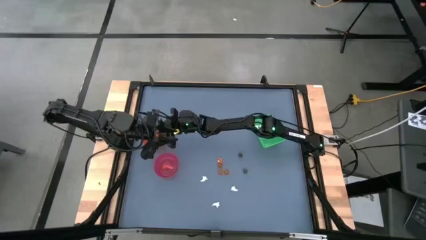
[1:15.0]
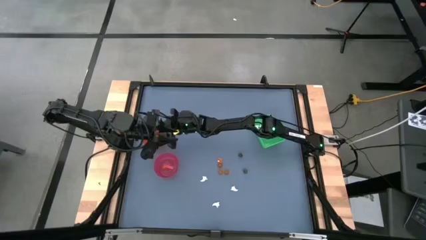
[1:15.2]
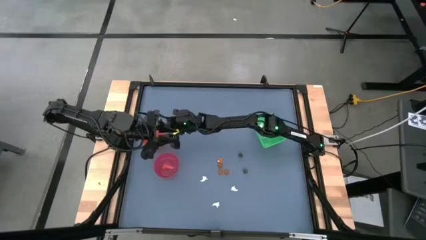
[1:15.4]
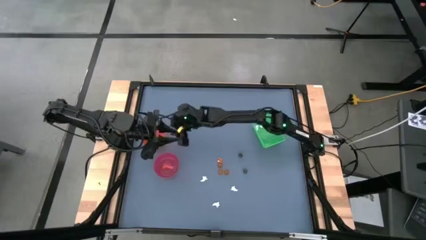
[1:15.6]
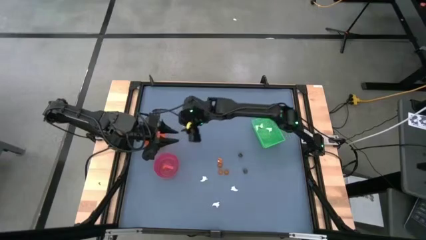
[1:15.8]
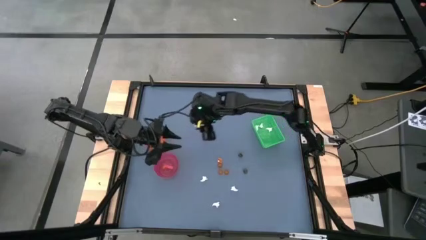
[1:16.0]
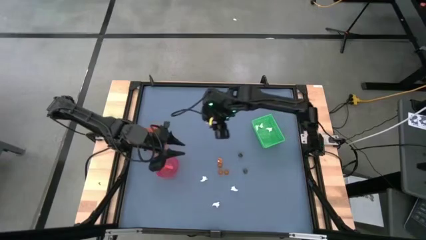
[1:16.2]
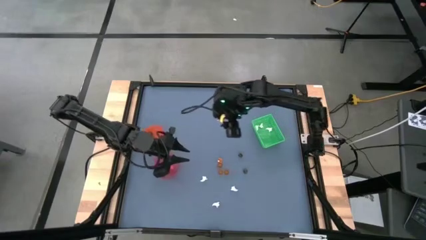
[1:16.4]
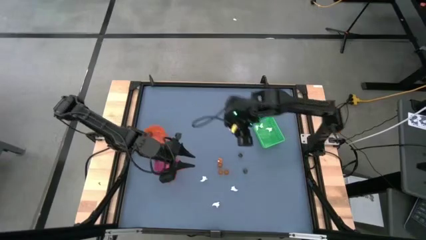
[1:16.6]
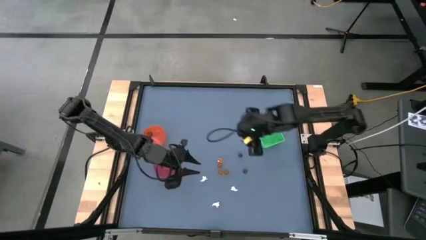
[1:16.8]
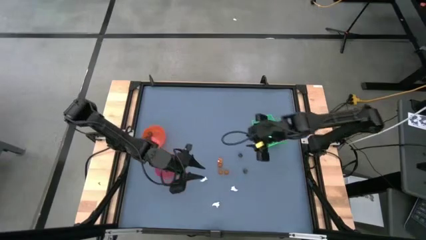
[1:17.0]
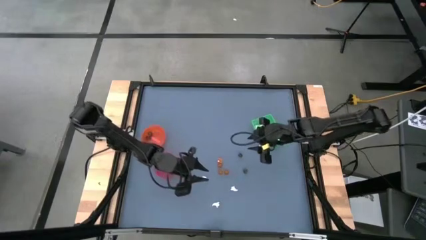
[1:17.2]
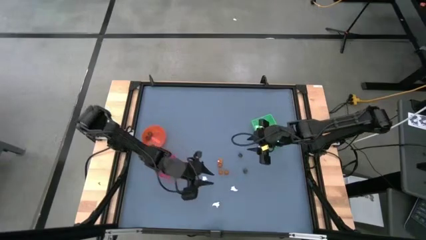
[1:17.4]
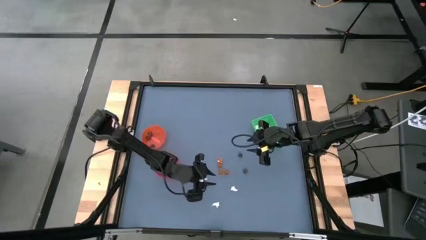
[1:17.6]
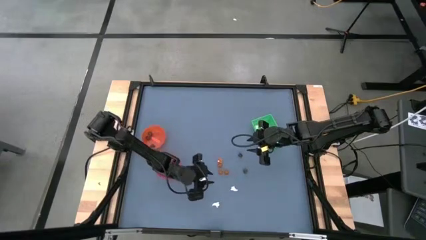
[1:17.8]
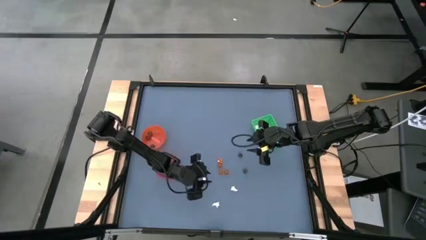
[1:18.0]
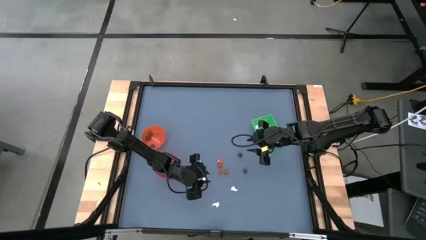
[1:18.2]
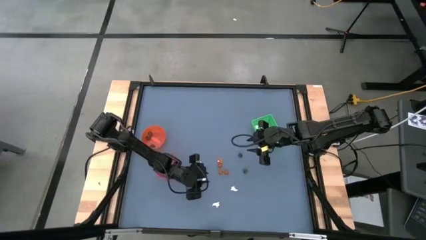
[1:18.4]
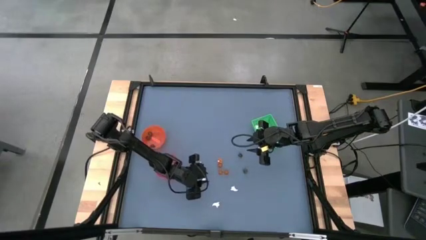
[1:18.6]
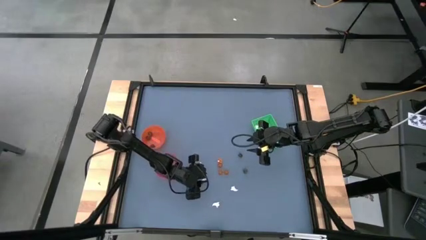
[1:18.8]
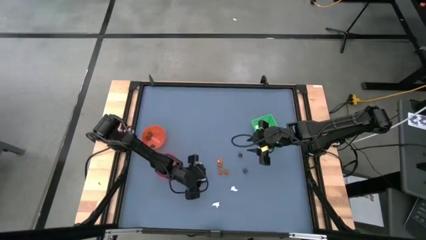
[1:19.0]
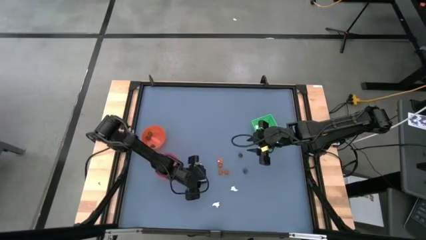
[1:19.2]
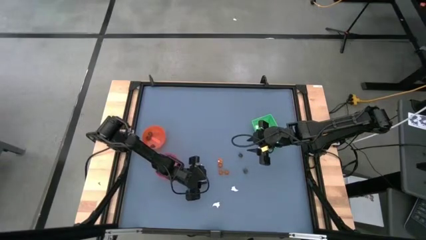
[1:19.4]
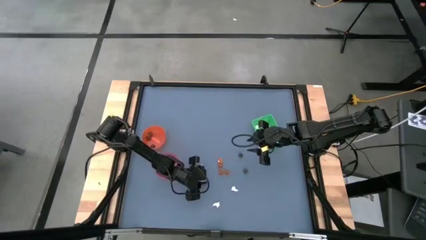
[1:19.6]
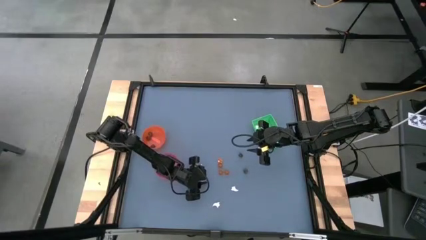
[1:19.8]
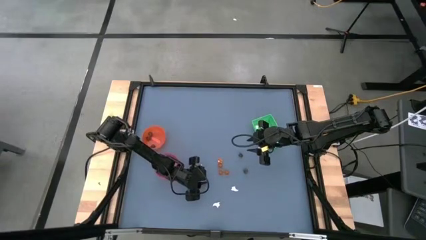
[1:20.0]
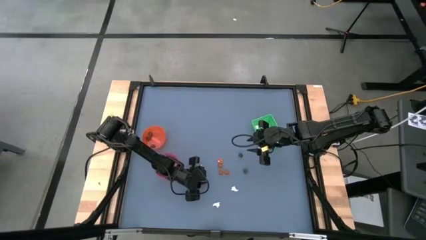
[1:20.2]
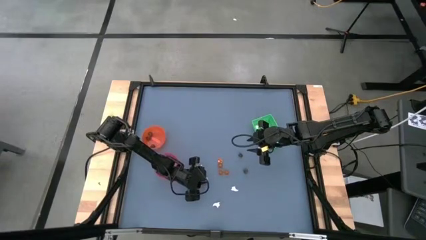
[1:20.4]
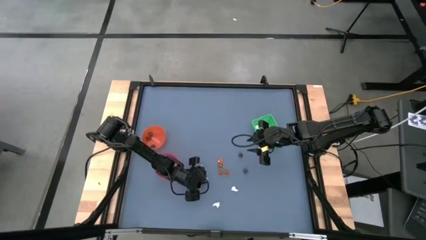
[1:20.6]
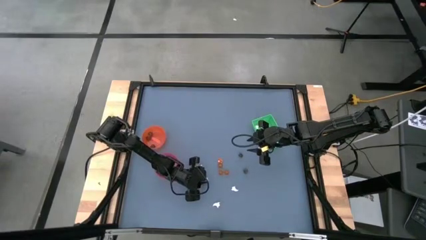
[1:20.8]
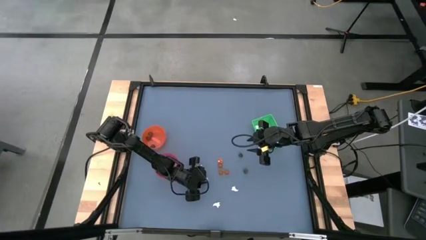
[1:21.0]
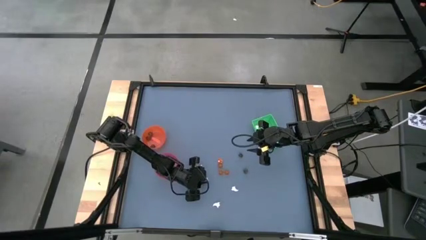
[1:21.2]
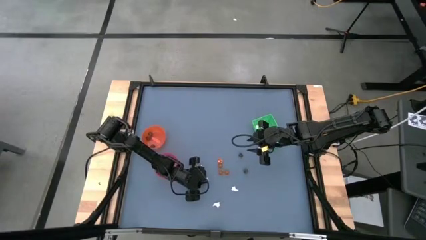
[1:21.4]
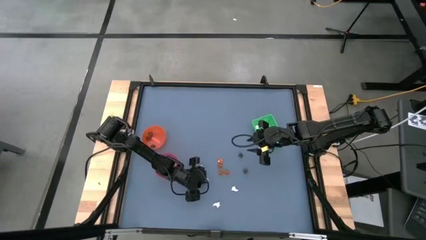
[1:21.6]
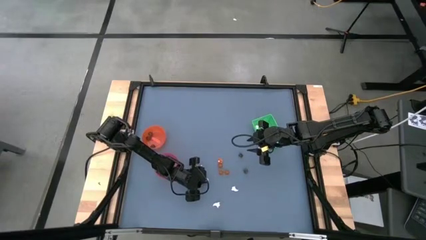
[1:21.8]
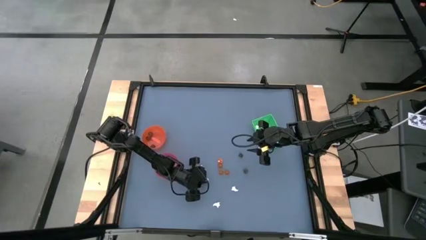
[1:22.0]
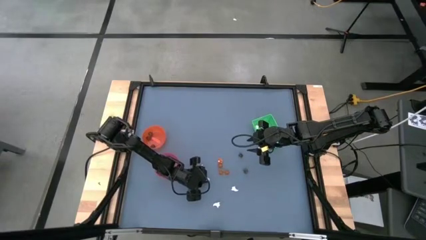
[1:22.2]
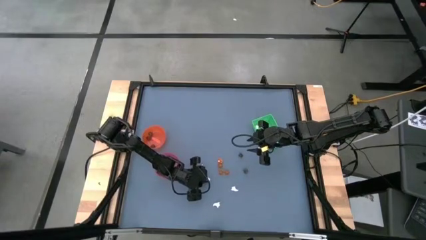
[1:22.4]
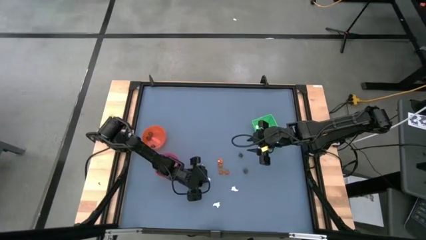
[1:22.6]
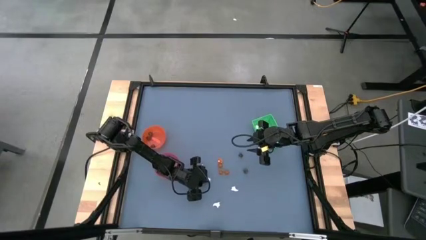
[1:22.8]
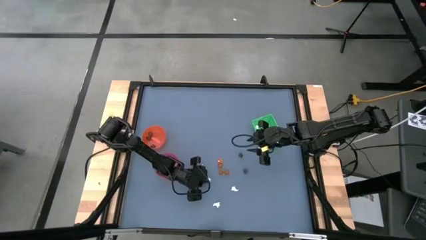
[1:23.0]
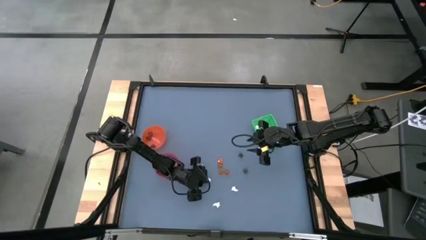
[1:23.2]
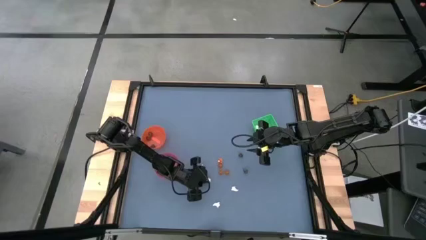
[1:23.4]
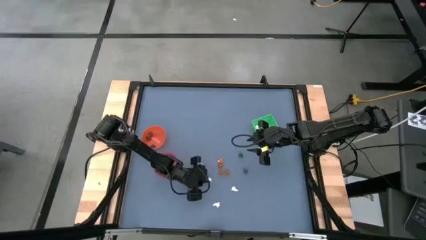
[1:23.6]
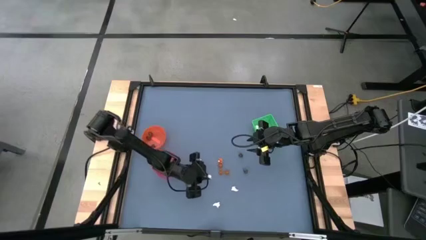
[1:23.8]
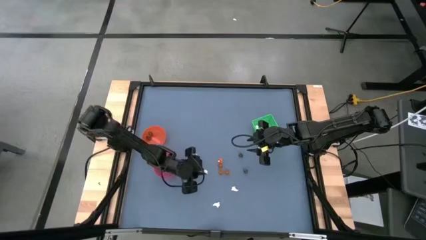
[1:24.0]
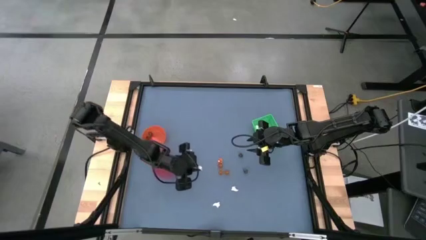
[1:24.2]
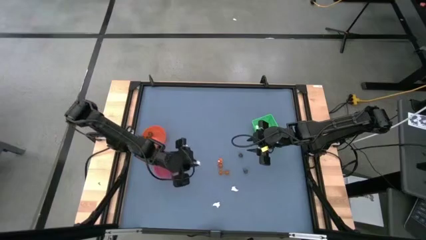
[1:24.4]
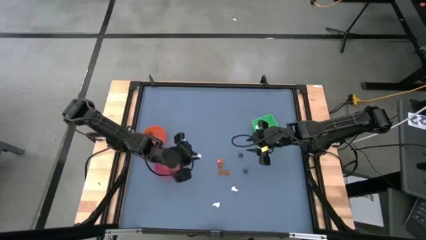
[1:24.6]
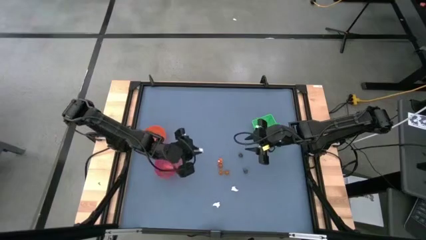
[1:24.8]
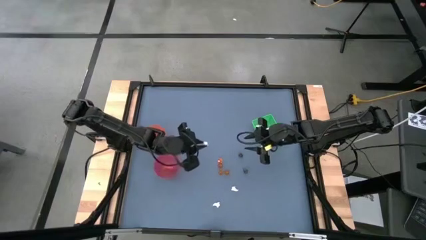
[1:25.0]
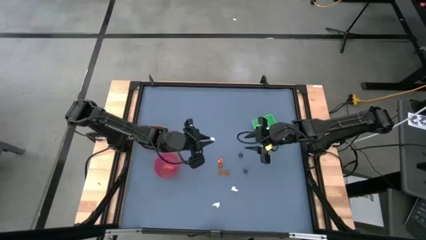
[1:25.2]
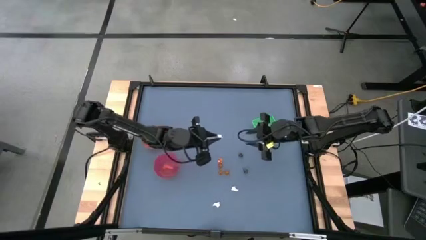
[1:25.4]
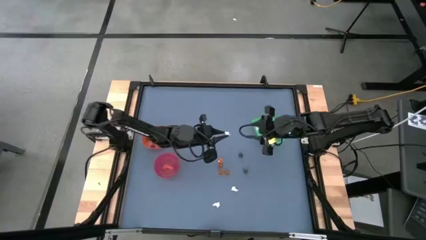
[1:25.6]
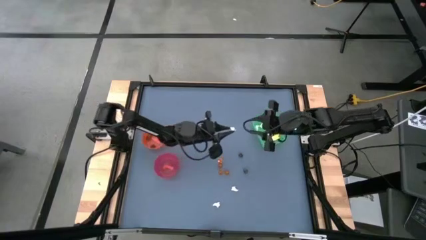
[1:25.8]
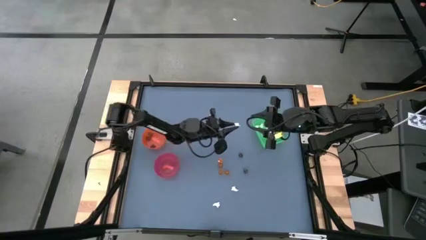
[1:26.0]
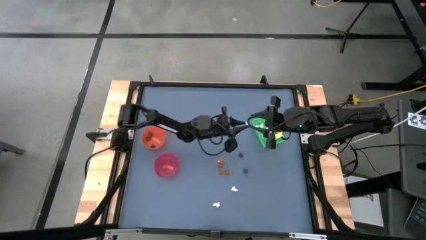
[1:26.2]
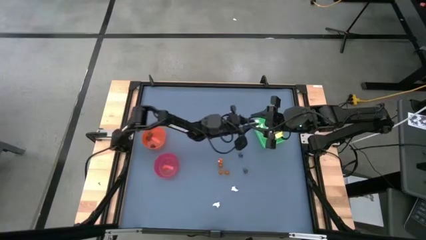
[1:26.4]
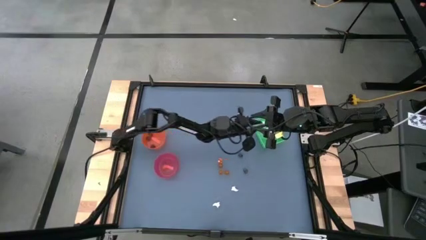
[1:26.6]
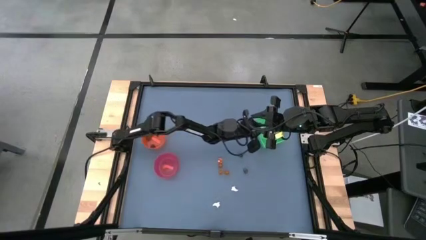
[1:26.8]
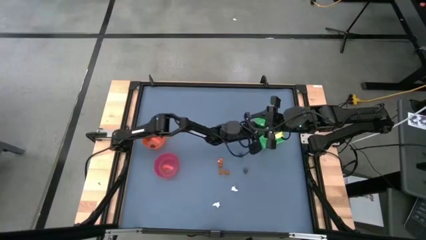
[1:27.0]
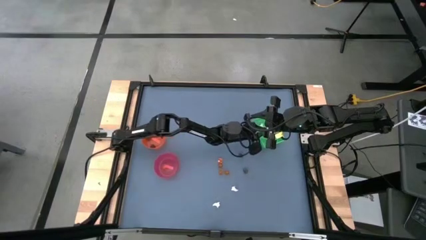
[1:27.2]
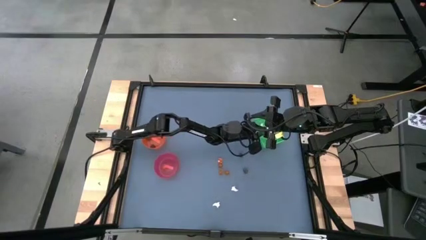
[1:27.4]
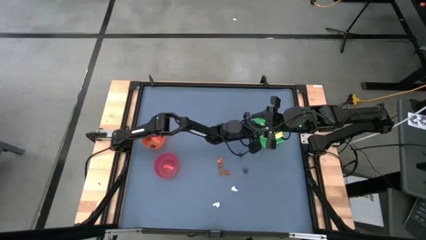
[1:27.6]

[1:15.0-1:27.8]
Task: Sort Halloween decoration
Put the white ghost toy into the green bin
